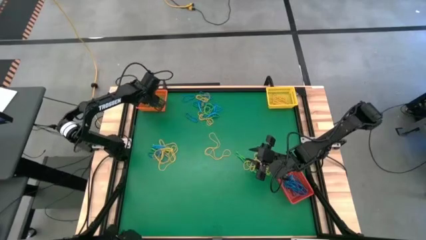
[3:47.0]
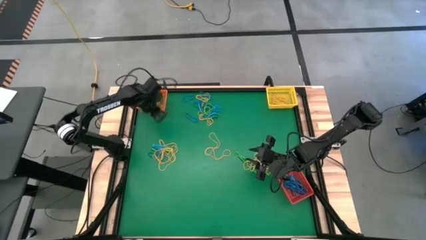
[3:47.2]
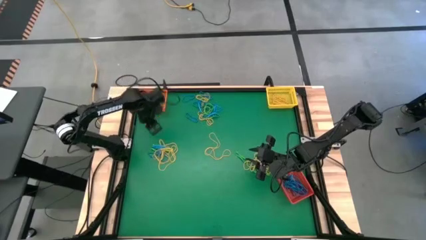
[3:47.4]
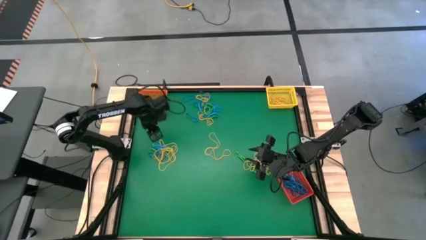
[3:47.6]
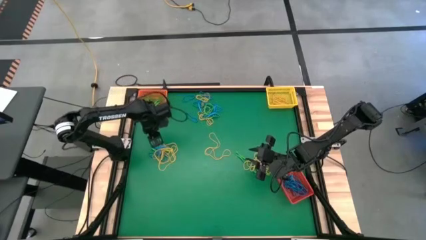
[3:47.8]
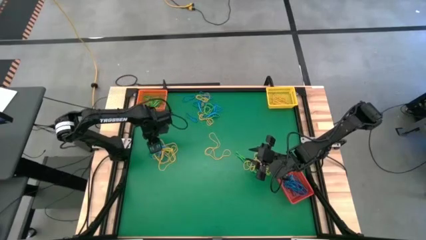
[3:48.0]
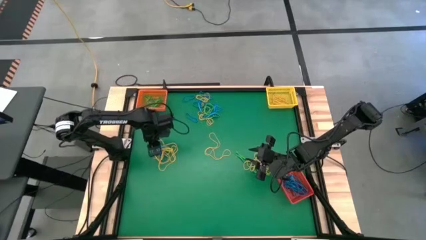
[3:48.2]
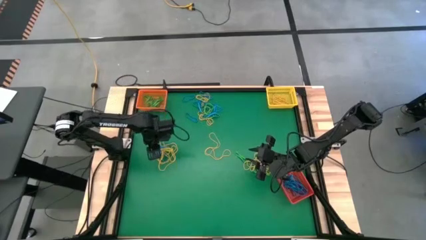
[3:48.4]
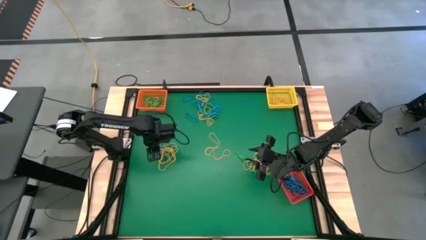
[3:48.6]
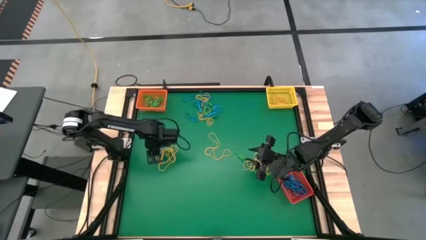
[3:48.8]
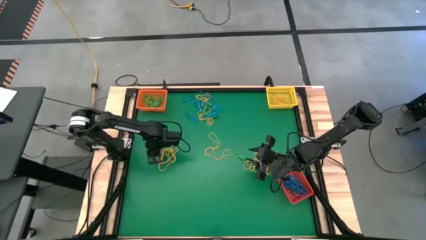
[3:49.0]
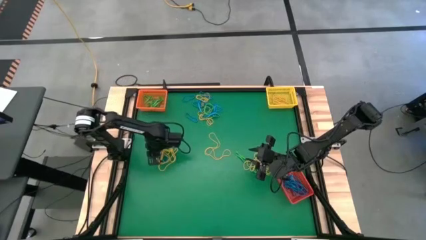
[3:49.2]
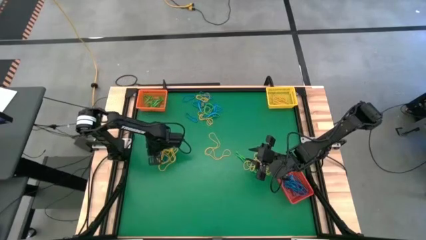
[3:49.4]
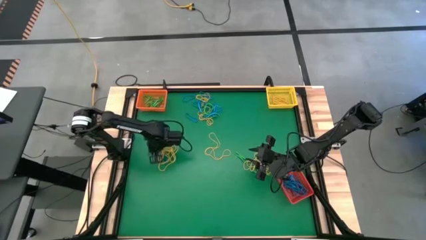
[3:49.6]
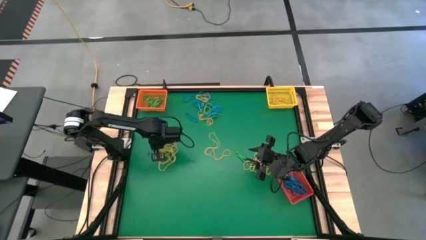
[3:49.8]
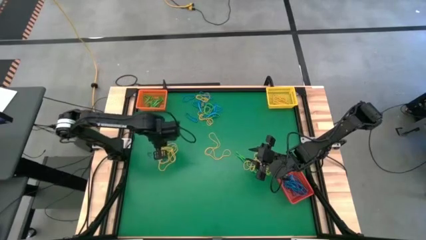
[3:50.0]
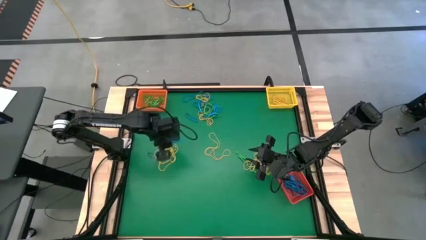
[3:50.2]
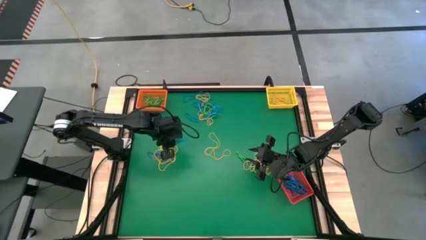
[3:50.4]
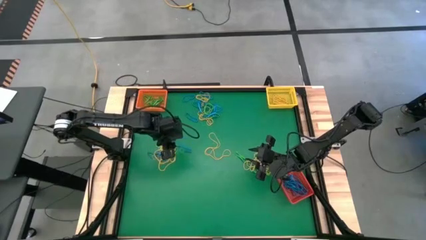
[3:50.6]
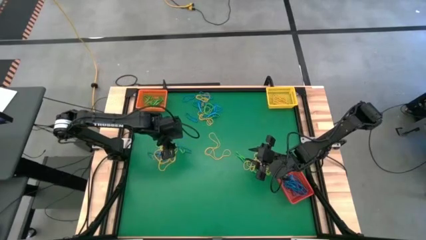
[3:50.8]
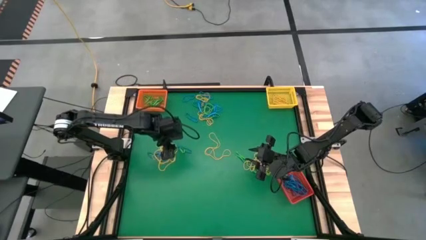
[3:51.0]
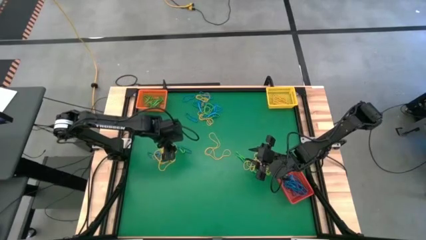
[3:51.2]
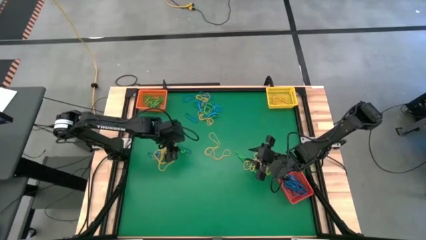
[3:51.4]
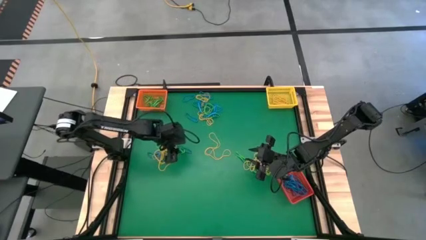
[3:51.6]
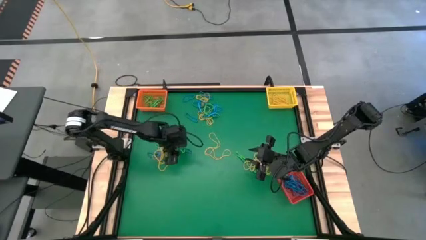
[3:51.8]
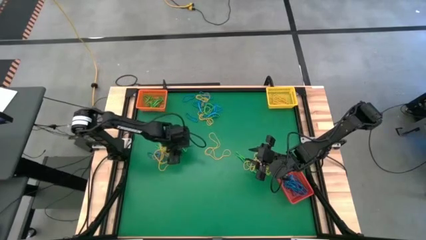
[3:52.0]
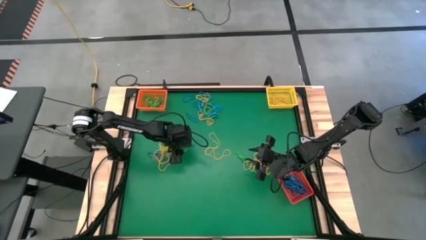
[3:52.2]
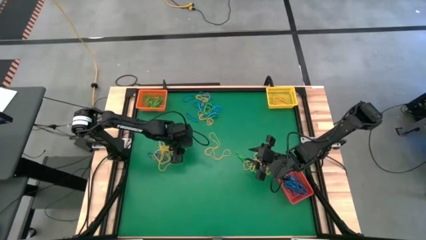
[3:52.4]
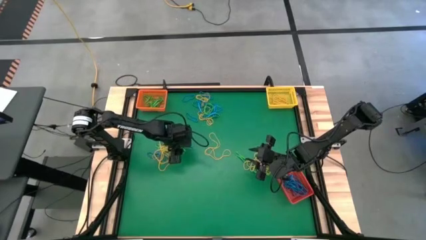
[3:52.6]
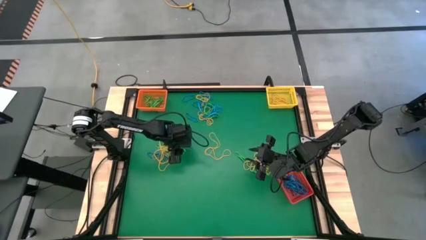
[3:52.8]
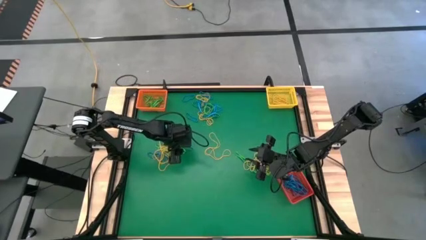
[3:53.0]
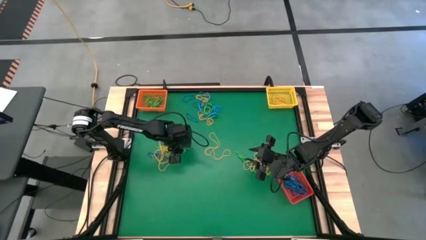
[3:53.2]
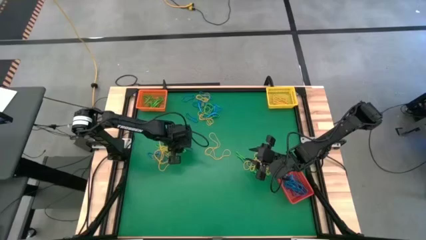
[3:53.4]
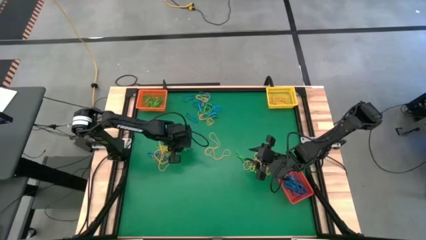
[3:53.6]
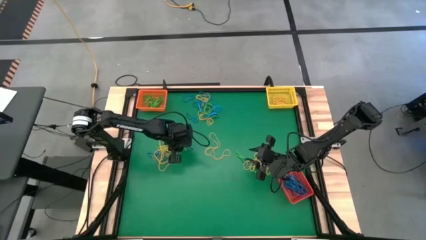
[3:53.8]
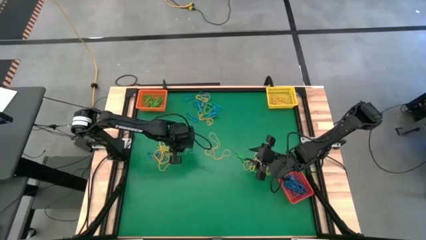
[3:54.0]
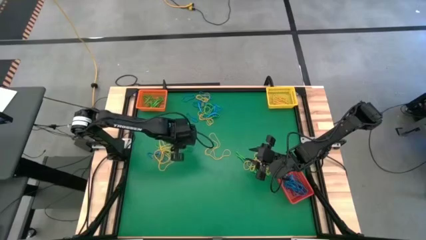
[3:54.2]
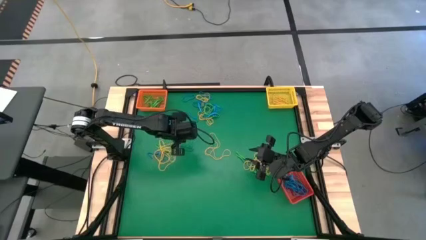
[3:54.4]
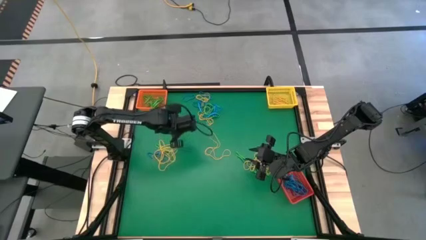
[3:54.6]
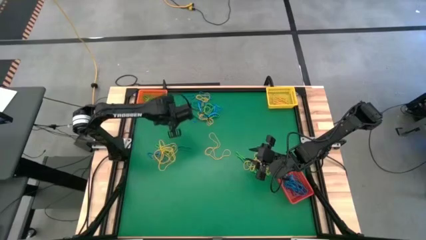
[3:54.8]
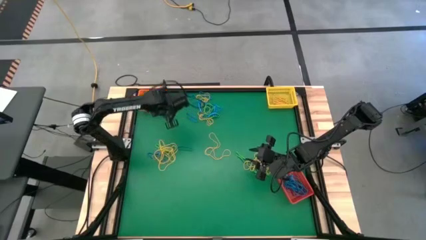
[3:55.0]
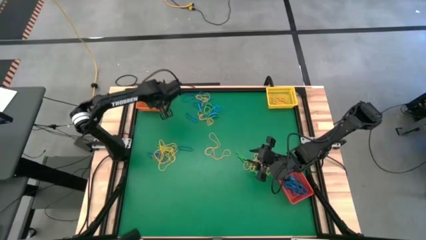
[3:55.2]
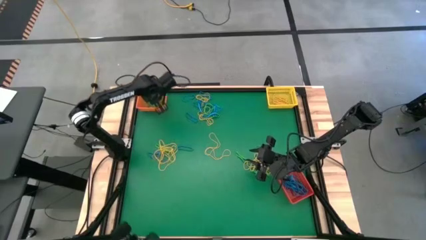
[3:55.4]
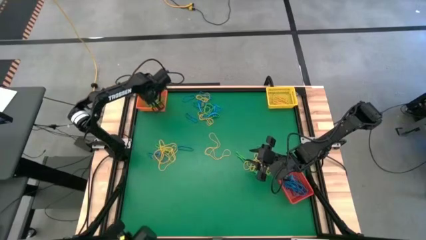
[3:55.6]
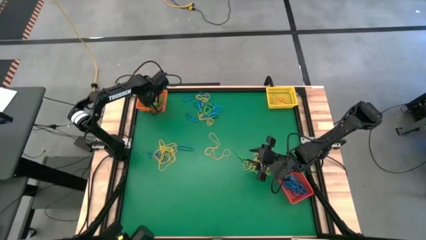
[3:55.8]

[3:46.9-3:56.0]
Task: Sort rubber bands into baskets
Put the green rubber band into the orange bin

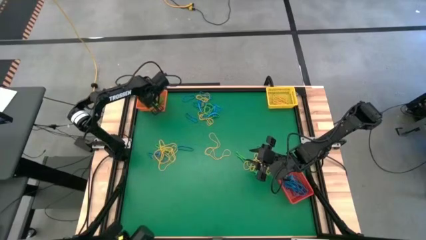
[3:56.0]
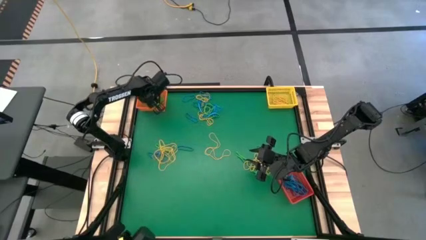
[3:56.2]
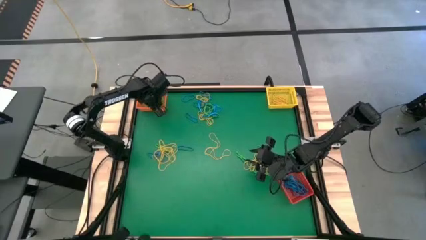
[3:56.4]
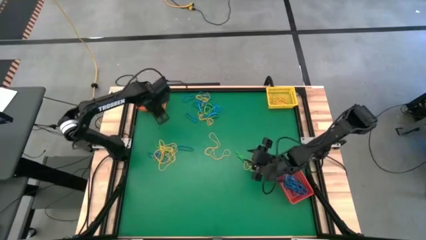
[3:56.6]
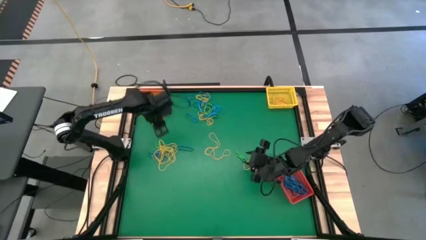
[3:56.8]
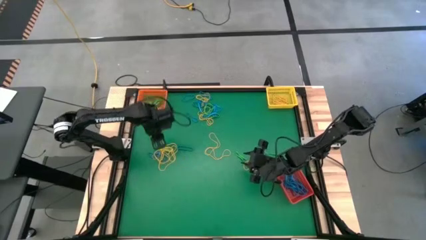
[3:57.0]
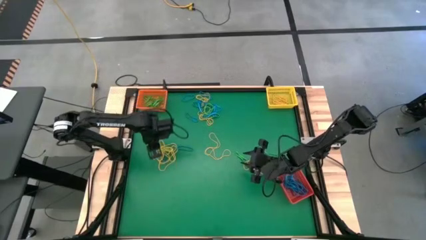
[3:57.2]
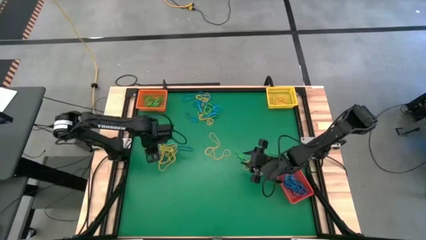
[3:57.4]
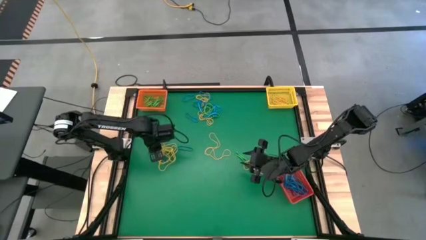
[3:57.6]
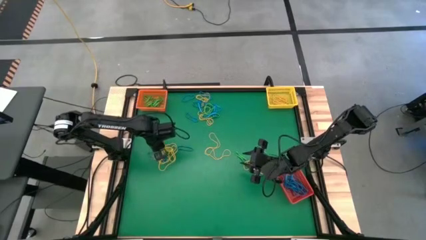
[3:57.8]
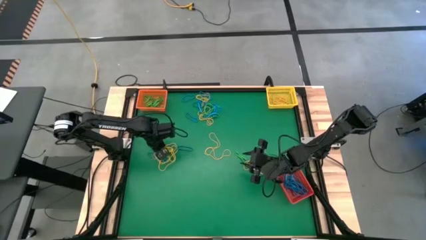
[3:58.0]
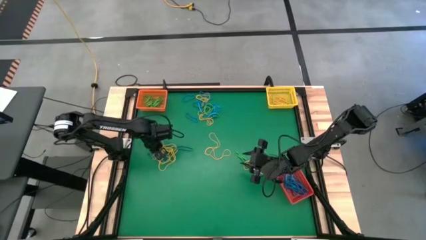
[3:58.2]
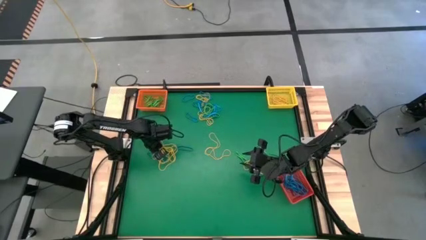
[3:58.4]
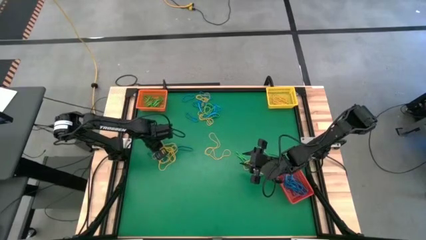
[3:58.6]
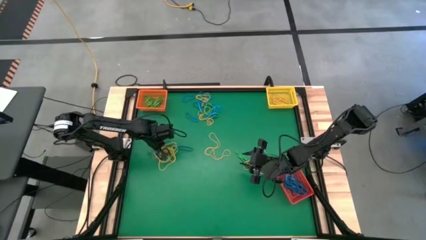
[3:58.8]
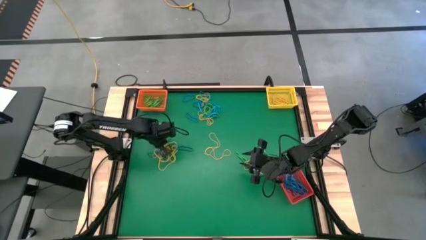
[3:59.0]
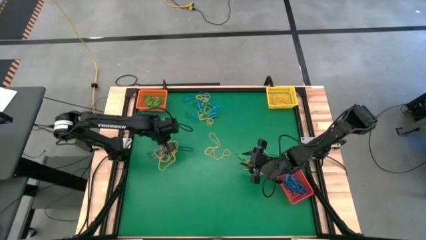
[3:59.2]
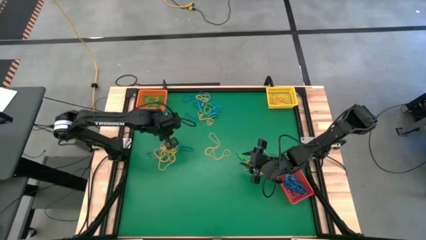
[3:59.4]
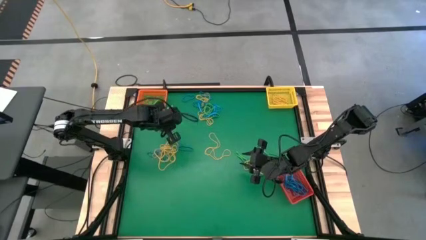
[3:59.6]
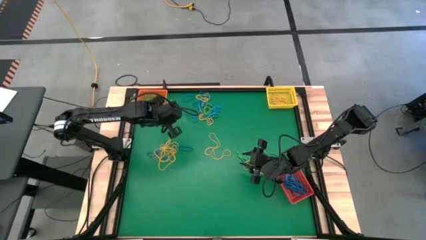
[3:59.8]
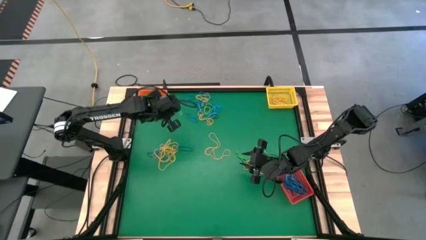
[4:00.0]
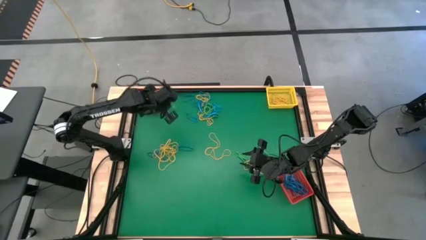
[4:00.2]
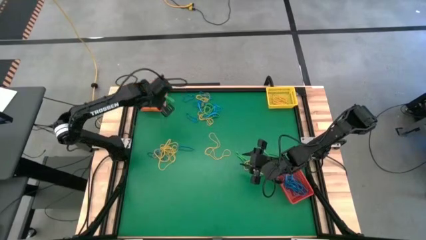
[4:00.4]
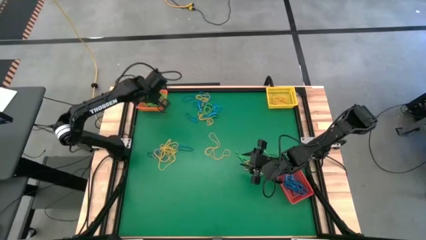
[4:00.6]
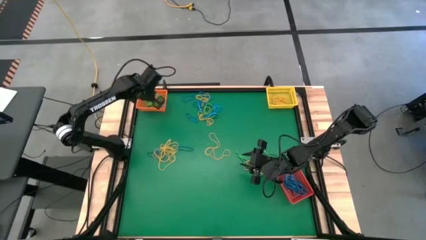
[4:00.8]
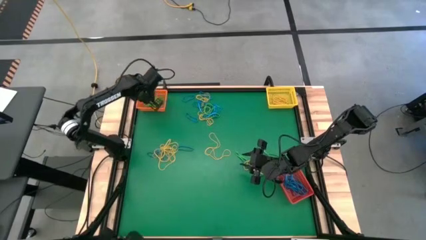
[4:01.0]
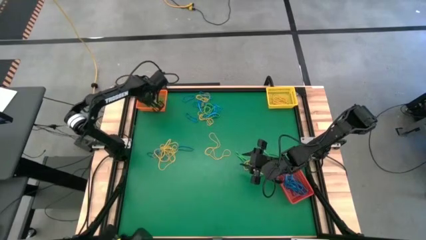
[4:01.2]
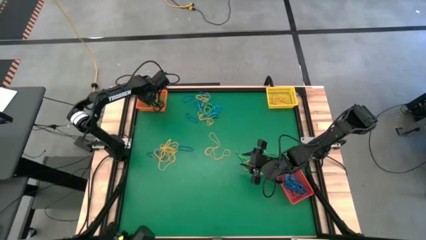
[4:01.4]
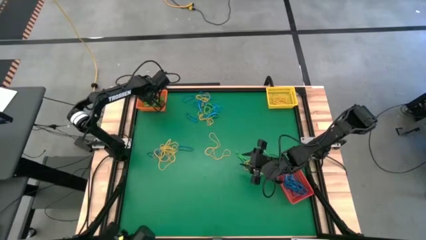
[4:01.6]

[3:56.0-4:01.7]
Put the green rubber band into the orange bin
